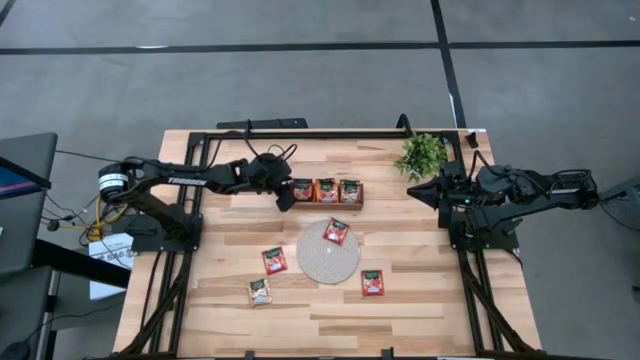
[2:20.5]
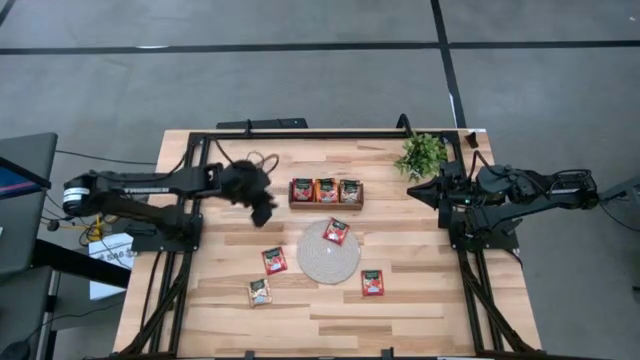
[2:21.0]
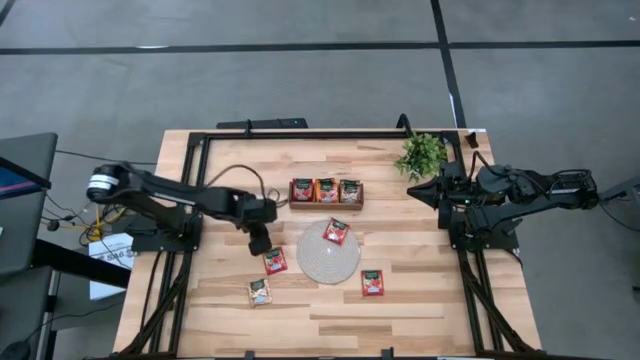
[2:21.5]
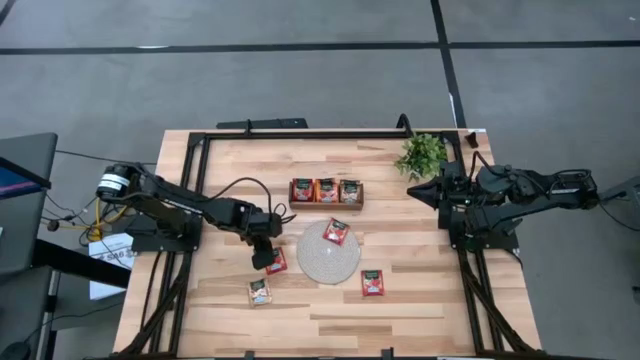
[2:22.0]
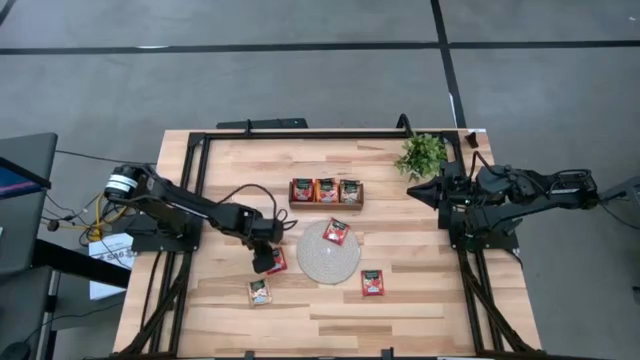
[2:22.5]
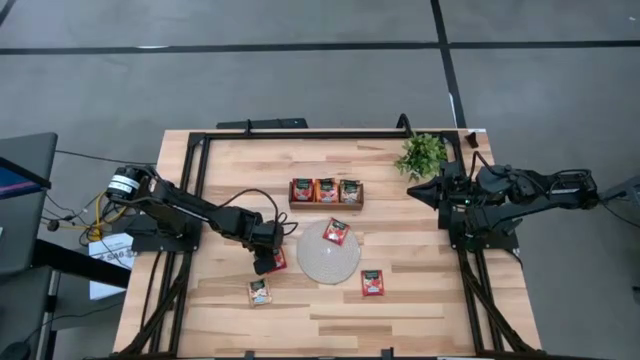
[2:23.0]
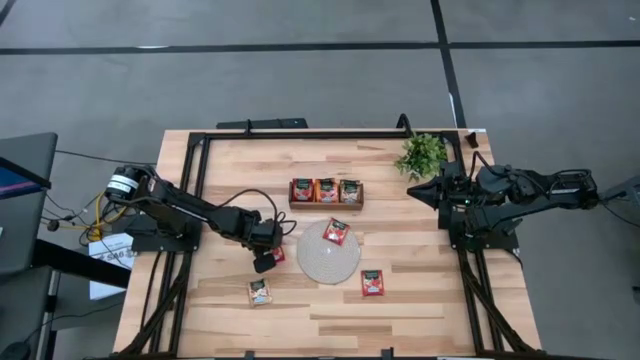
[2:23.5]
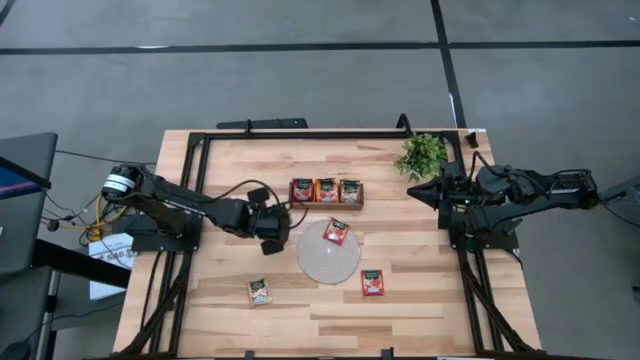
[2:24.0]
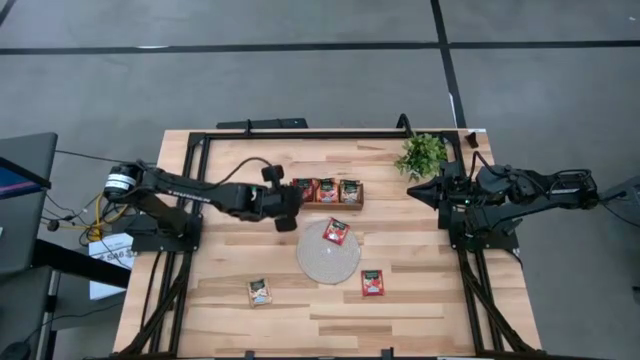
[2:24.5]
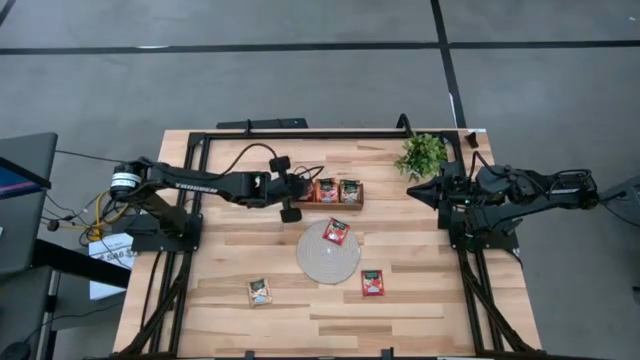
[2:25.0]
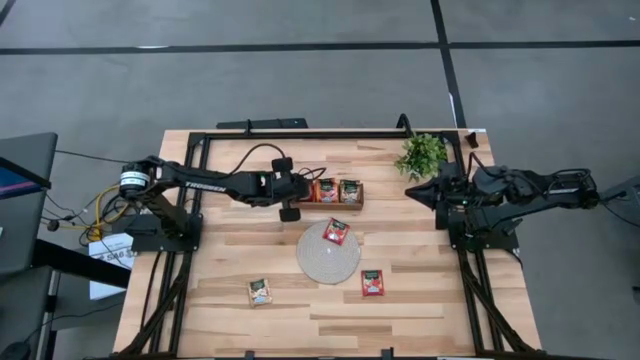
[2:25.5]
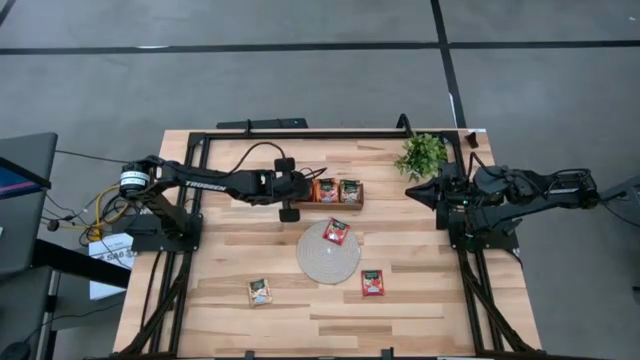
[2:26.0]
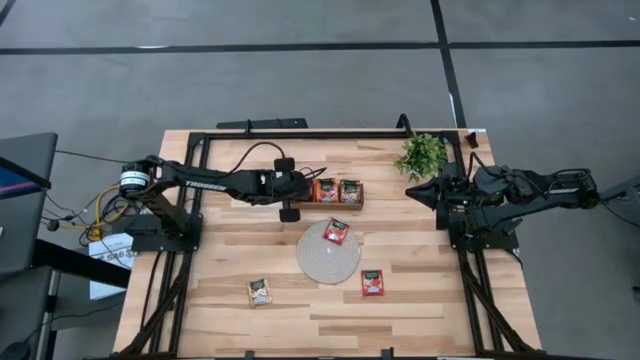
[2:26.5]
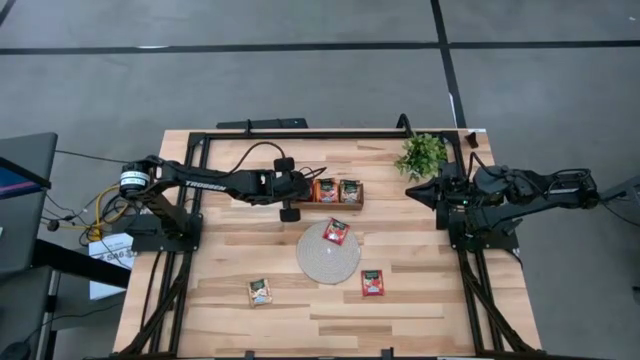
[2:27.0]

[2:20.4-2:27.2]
Task: Pick & Place Tea
Put the red tea bag into the left section of the wooden organizer

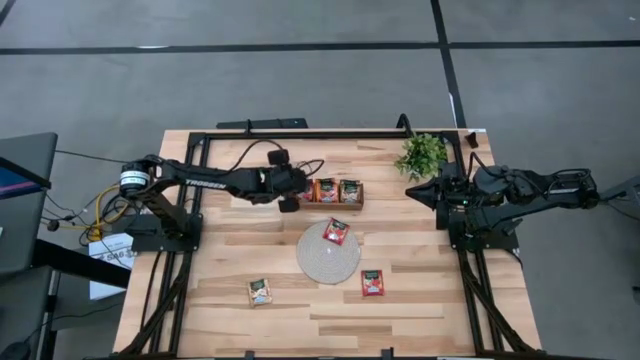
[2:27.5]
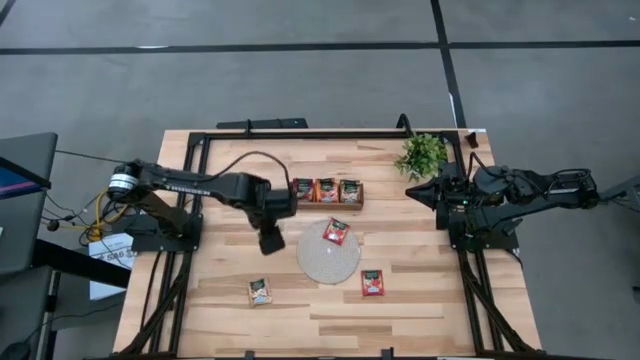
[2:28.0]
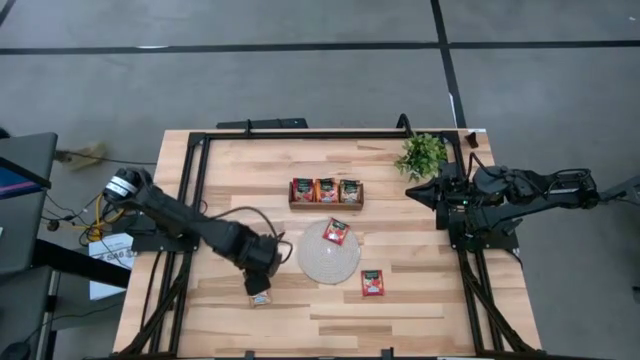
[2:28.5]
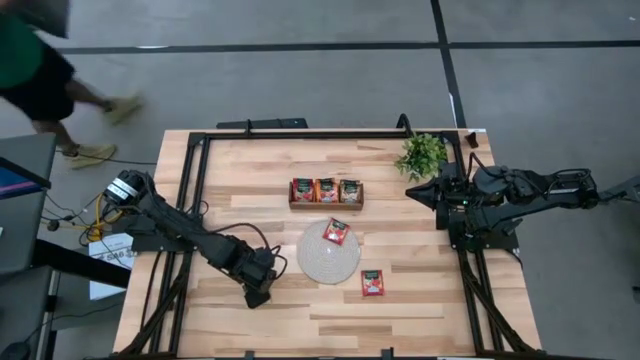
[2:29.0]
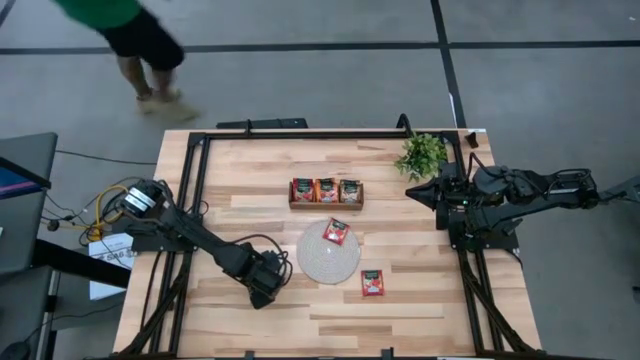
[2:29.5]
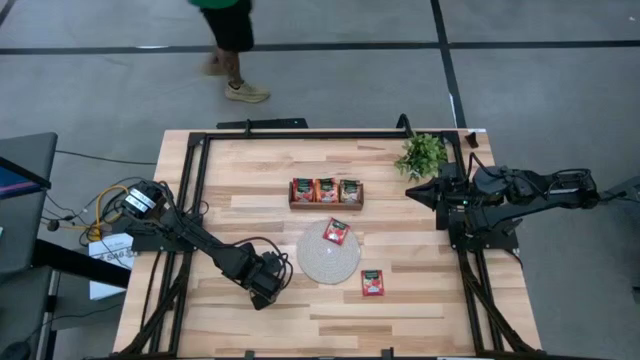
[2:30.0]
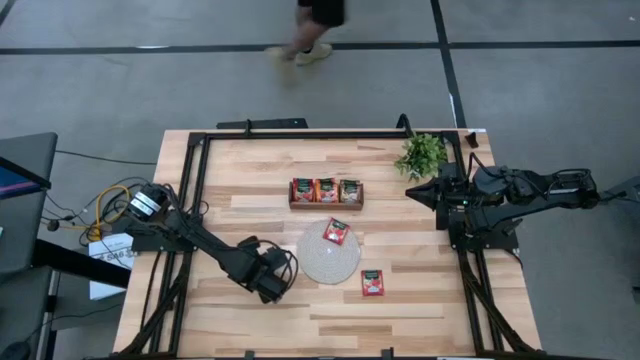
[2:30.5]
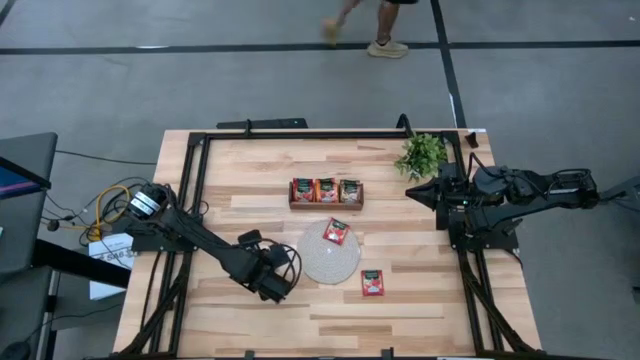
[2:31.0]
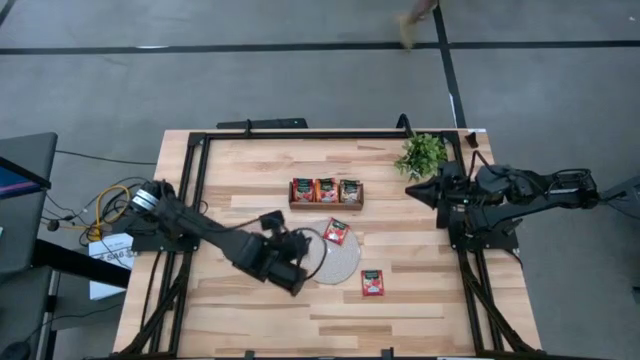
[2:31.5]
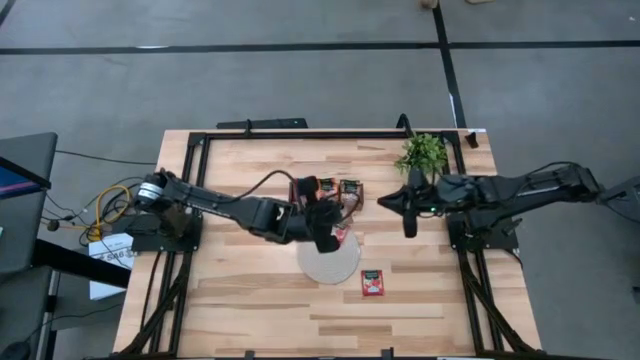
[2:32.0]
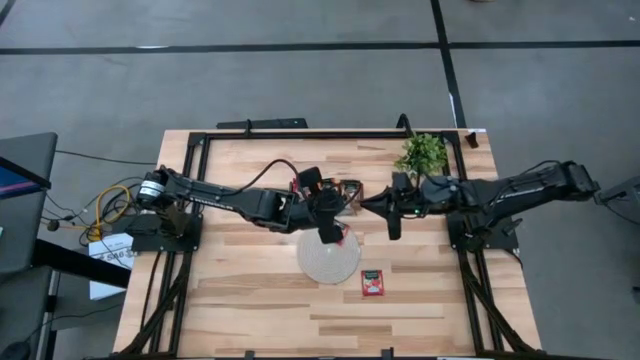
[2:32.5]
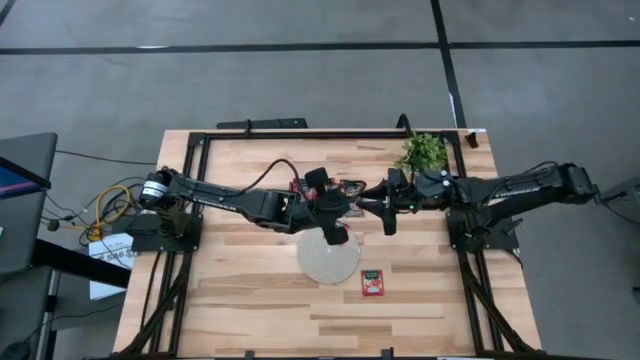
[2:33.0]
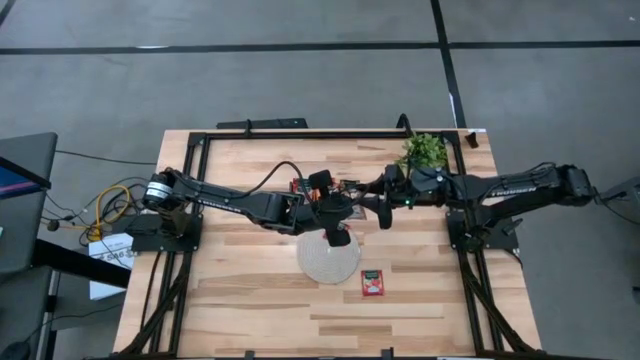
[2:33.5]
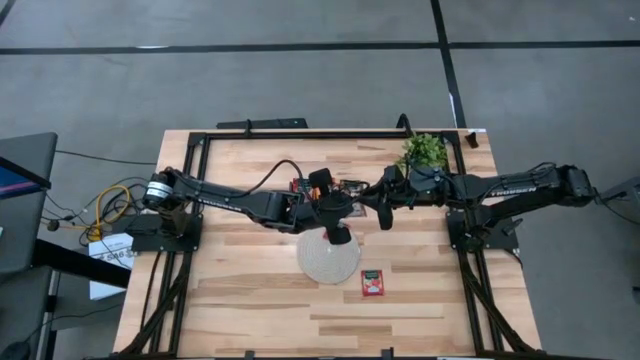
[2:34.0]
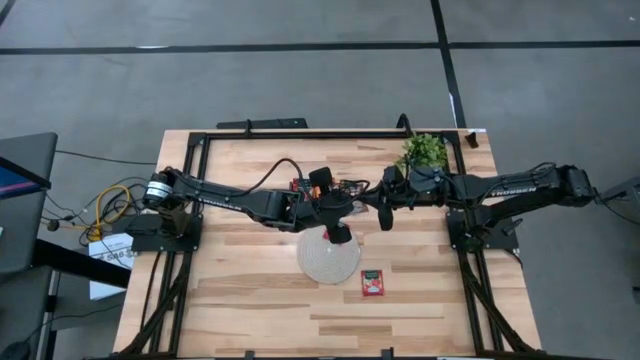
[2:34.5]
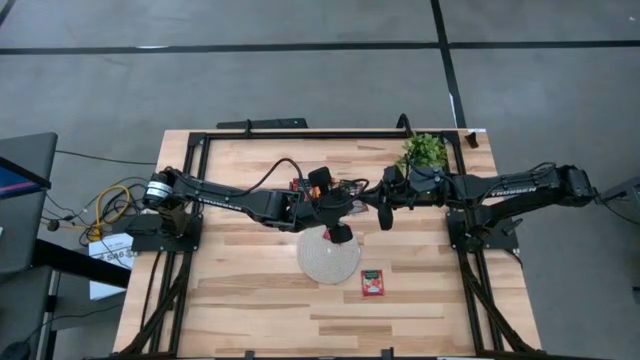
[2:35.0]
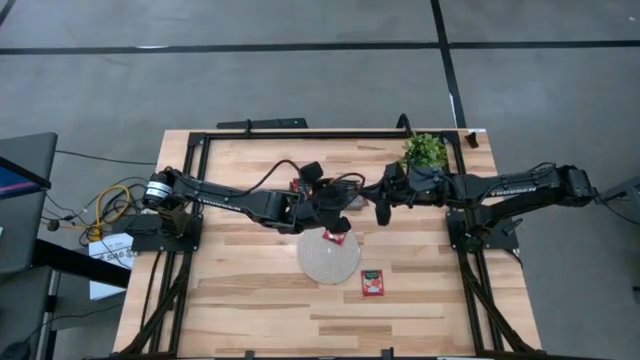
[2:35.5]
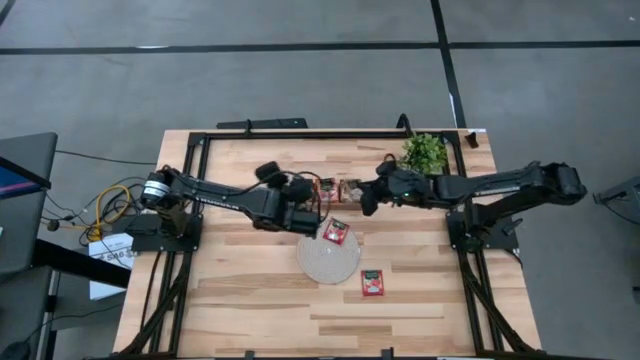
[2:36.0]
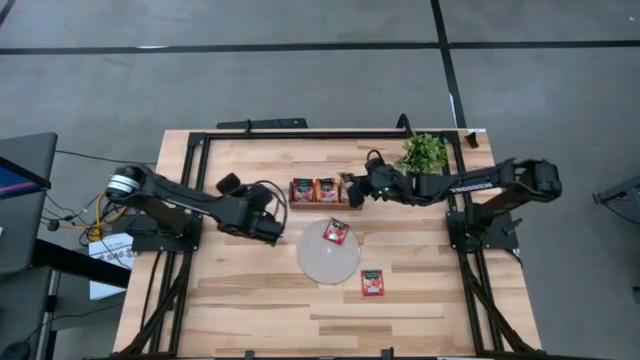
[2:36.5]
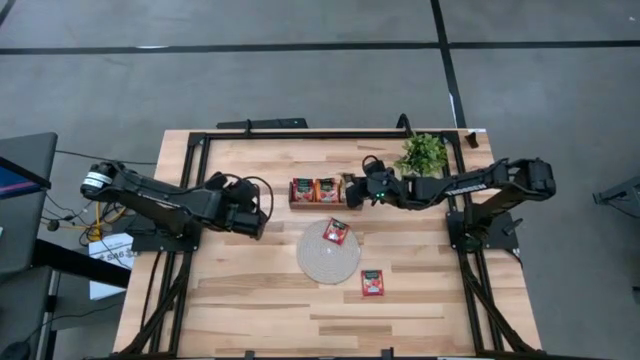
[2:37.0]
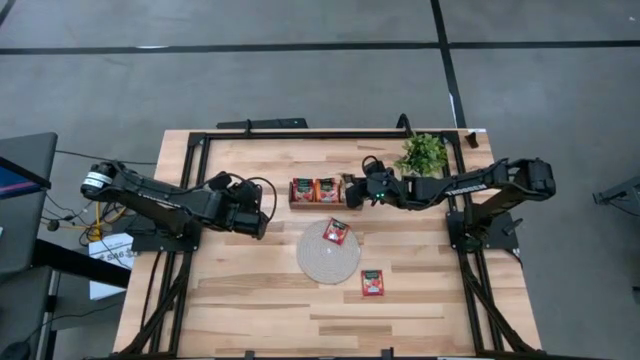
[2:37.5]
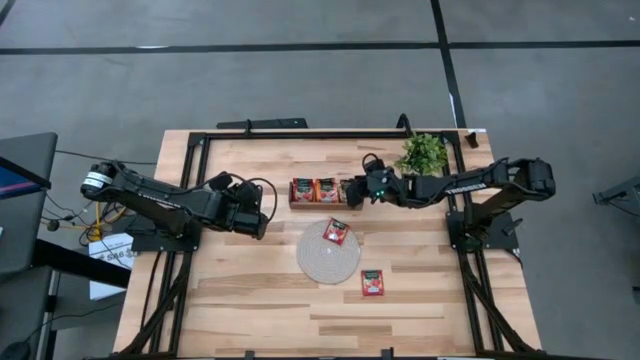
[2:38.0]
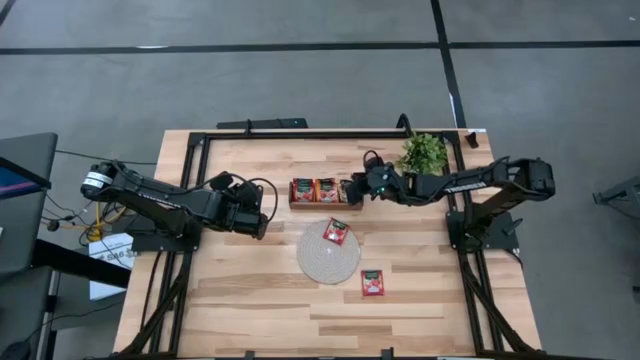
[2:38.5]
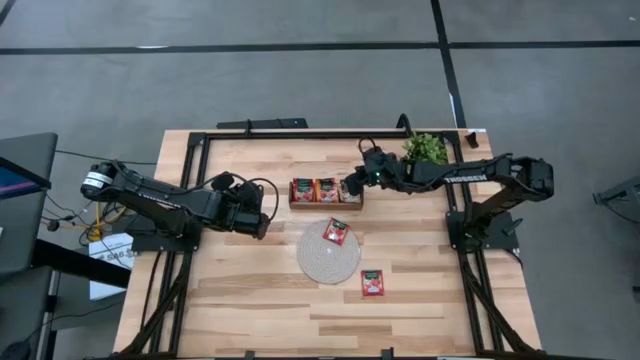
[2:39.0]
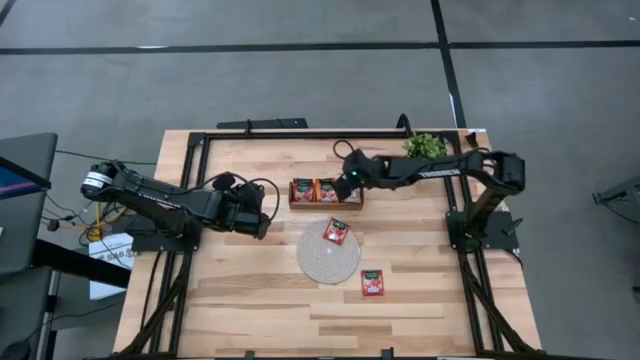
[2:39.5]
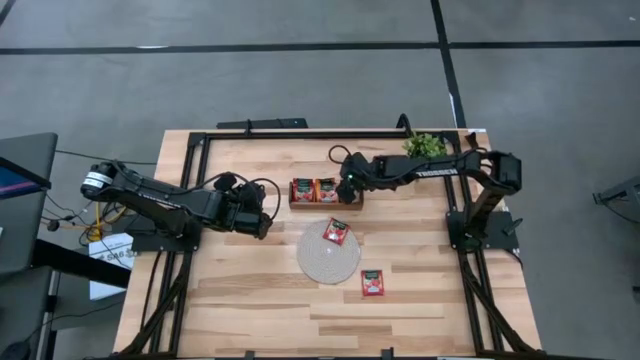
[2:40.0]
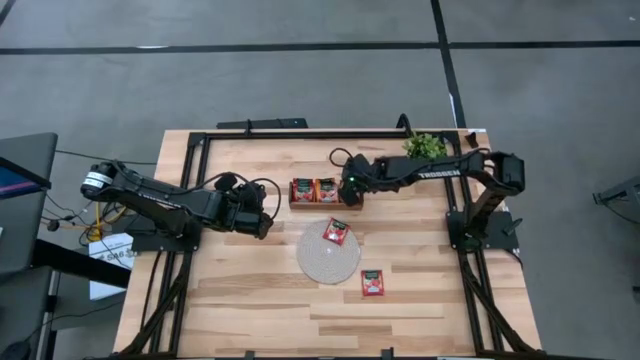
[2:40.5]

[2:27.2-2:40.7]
Put the brown tea bag into the right section of the wooden organizer
